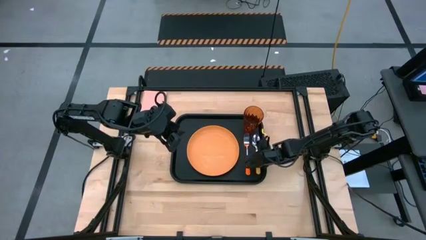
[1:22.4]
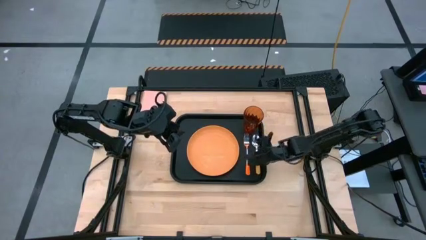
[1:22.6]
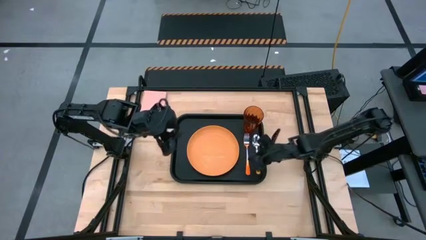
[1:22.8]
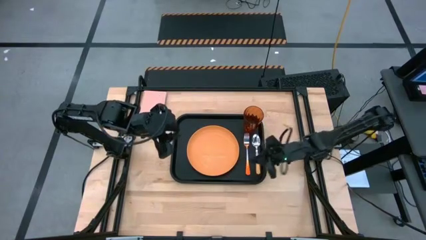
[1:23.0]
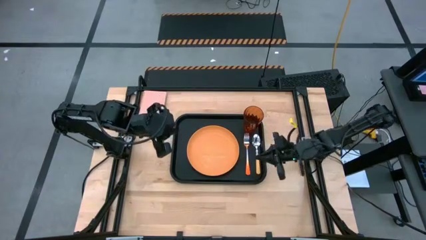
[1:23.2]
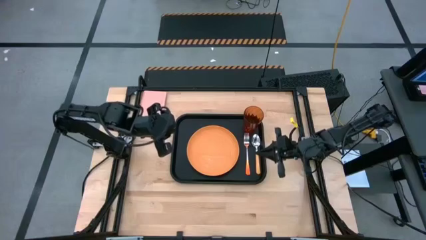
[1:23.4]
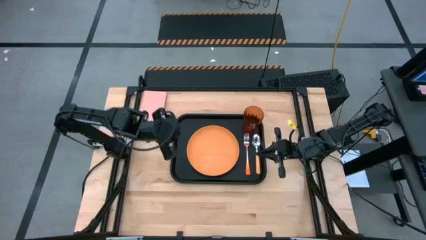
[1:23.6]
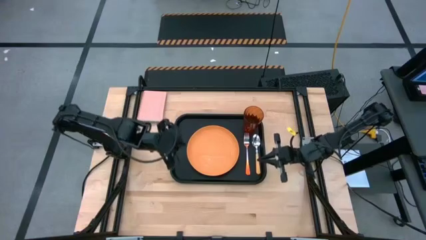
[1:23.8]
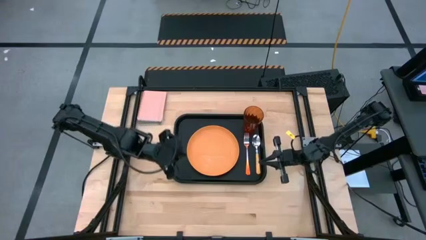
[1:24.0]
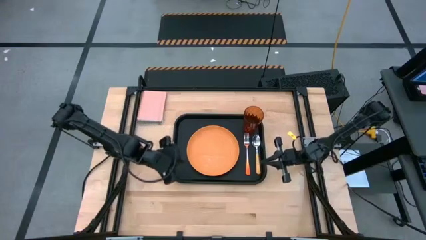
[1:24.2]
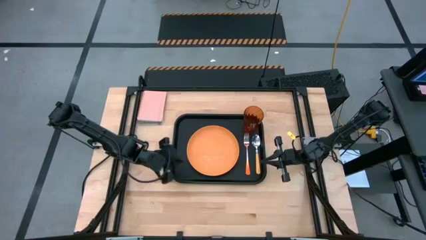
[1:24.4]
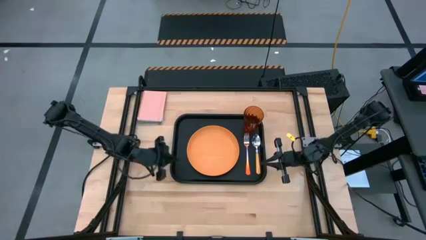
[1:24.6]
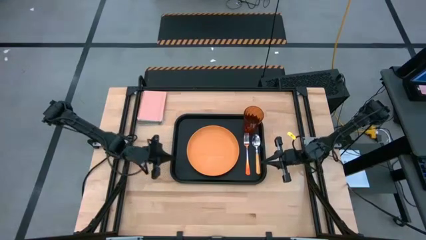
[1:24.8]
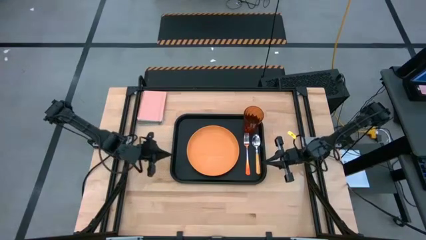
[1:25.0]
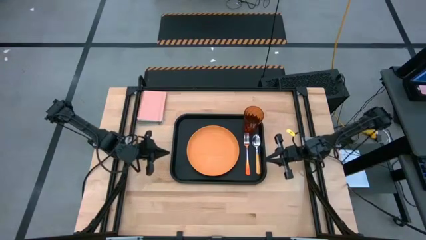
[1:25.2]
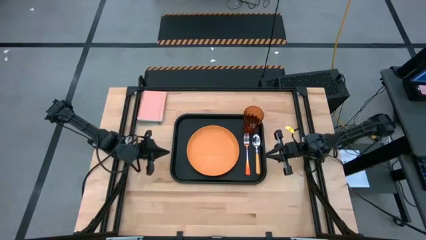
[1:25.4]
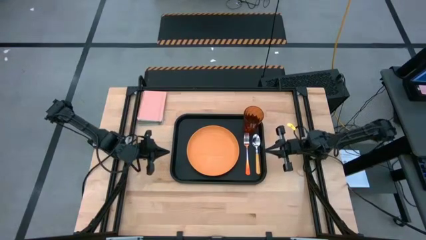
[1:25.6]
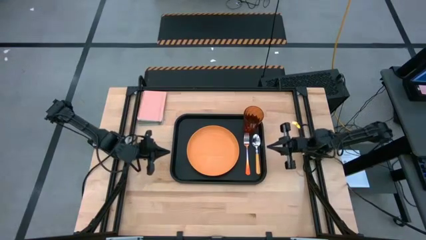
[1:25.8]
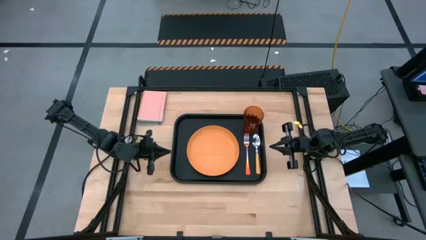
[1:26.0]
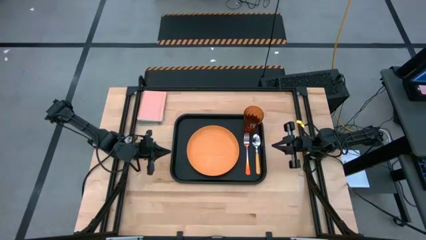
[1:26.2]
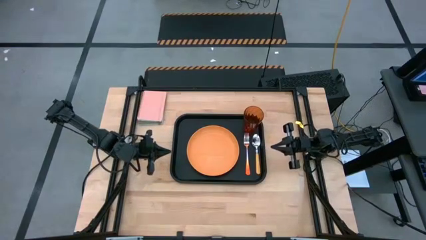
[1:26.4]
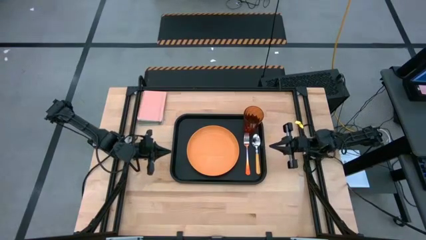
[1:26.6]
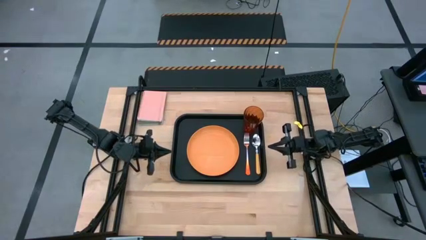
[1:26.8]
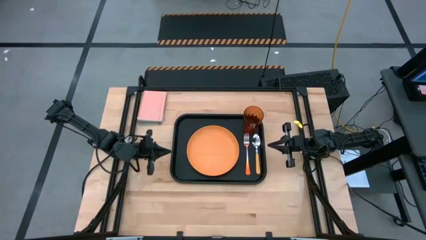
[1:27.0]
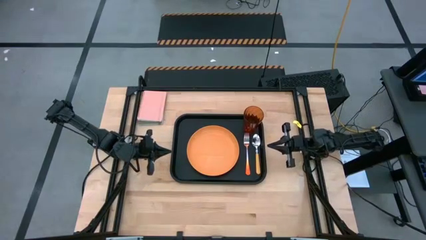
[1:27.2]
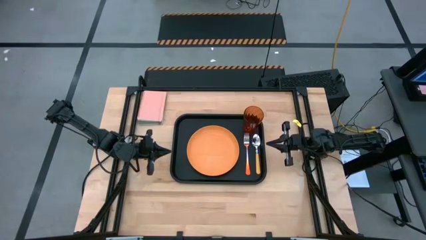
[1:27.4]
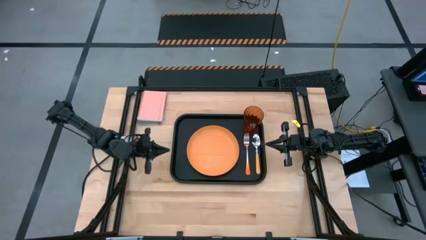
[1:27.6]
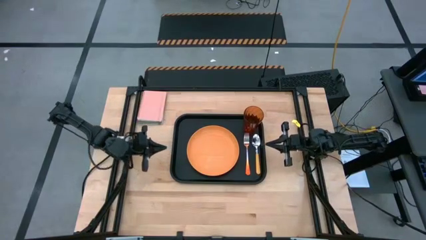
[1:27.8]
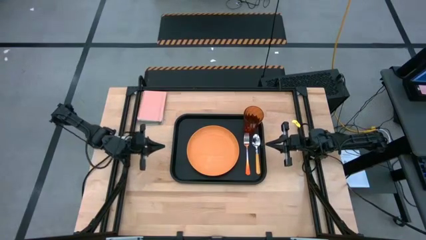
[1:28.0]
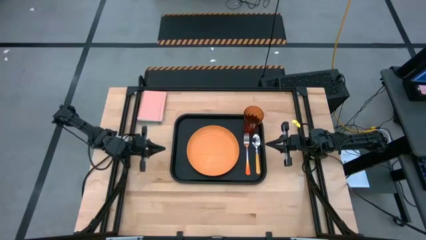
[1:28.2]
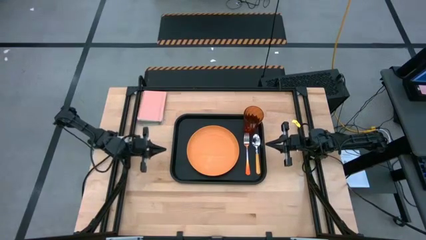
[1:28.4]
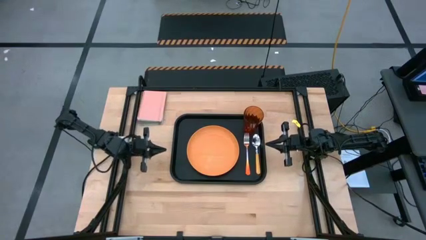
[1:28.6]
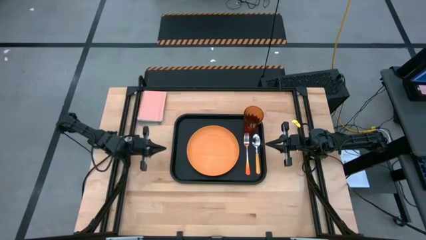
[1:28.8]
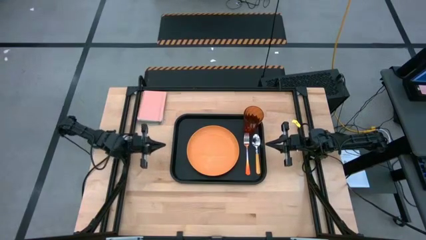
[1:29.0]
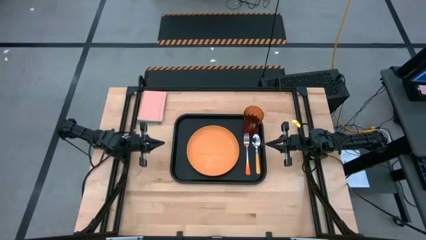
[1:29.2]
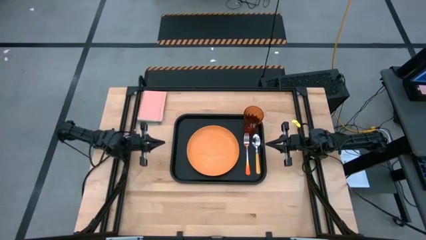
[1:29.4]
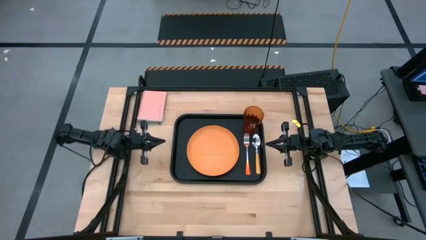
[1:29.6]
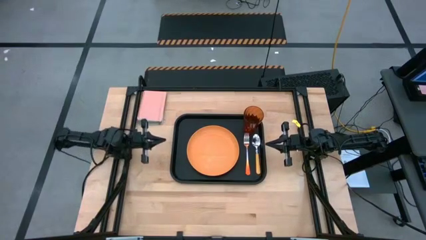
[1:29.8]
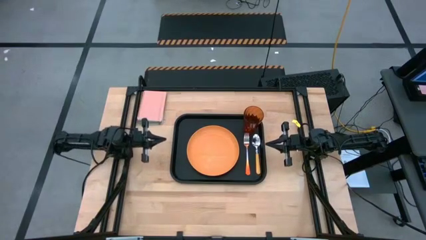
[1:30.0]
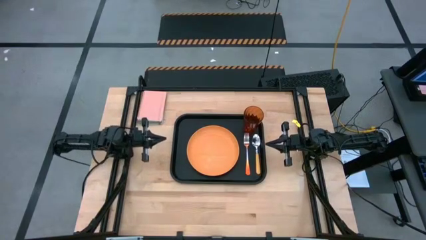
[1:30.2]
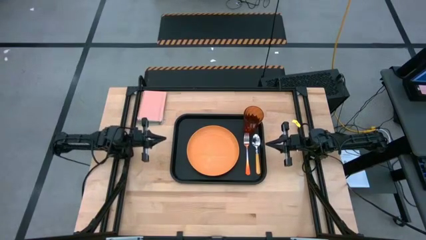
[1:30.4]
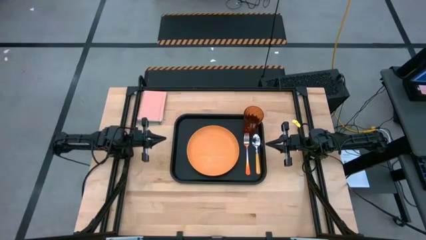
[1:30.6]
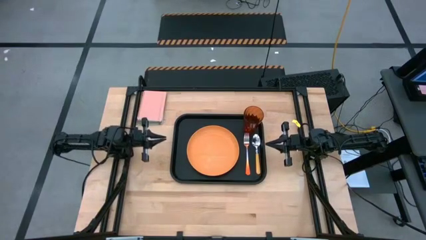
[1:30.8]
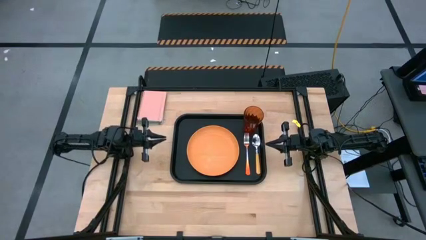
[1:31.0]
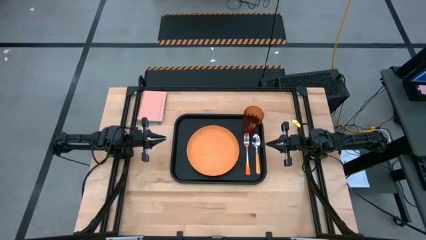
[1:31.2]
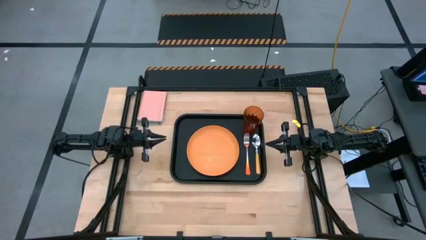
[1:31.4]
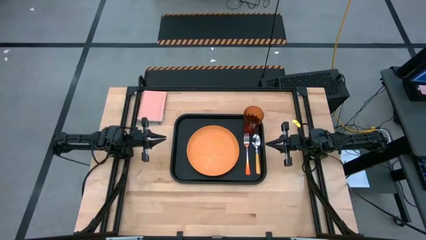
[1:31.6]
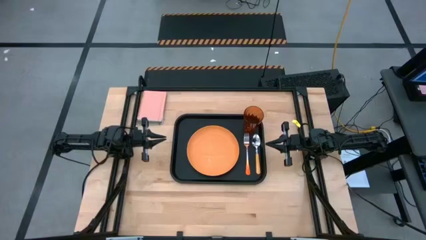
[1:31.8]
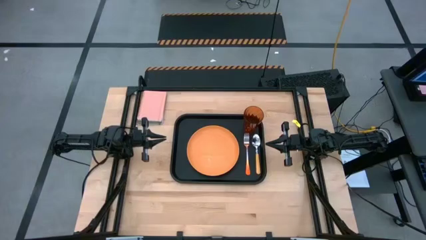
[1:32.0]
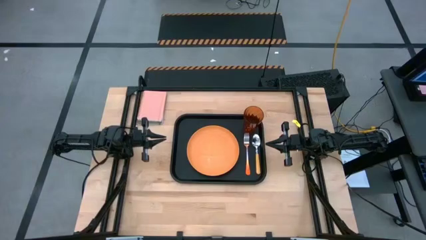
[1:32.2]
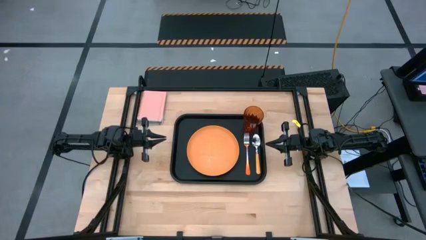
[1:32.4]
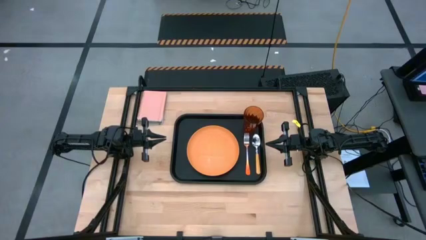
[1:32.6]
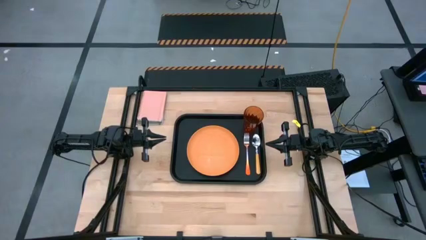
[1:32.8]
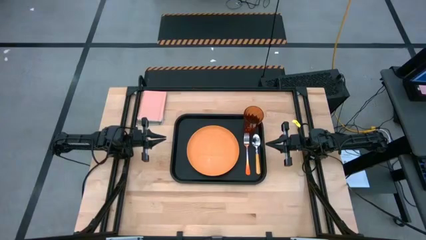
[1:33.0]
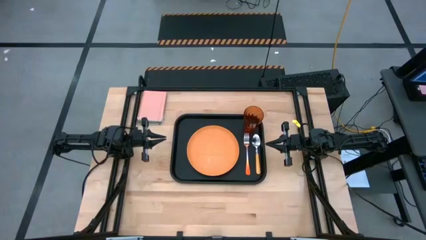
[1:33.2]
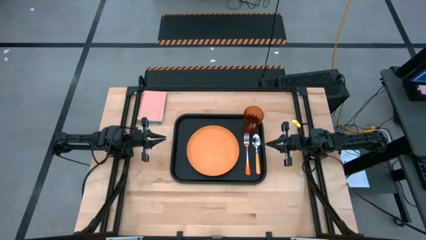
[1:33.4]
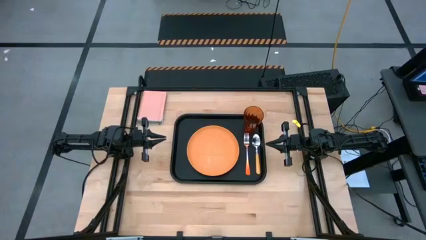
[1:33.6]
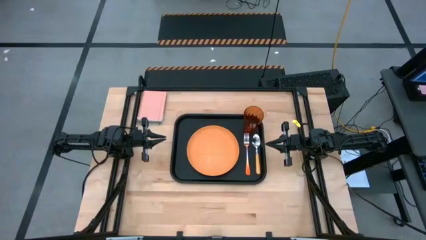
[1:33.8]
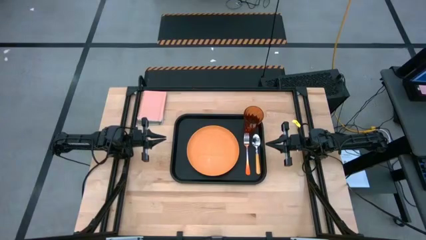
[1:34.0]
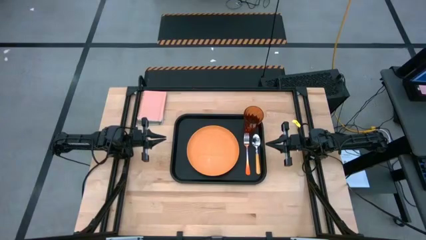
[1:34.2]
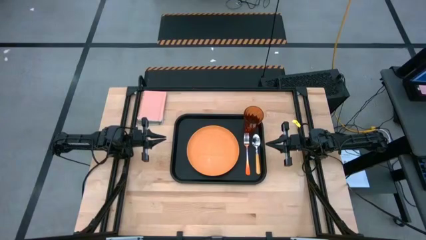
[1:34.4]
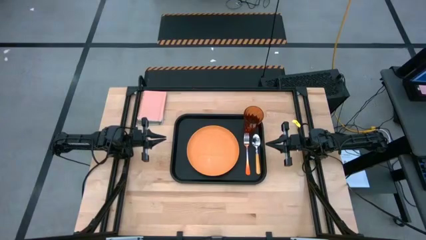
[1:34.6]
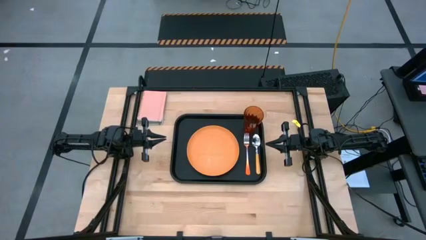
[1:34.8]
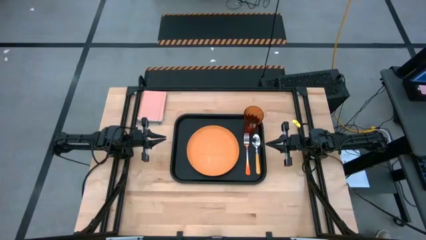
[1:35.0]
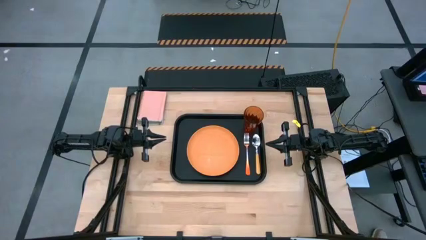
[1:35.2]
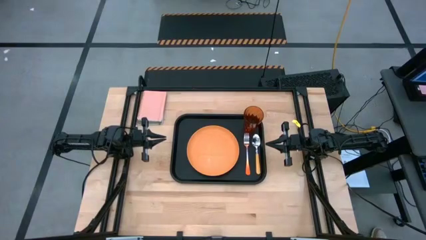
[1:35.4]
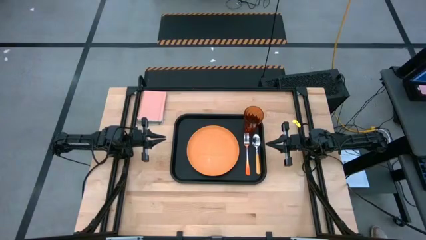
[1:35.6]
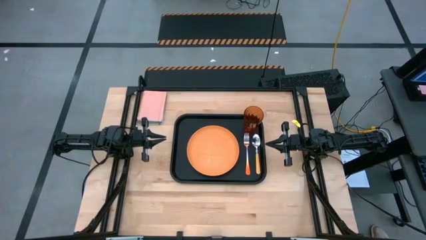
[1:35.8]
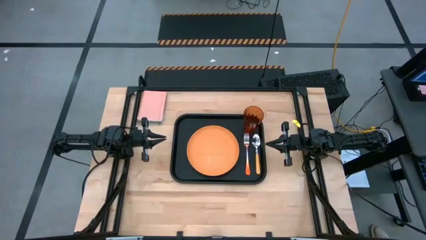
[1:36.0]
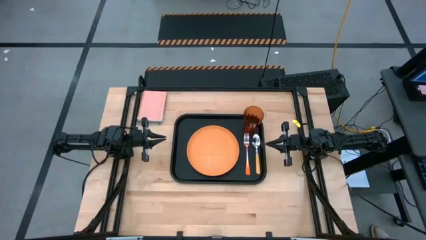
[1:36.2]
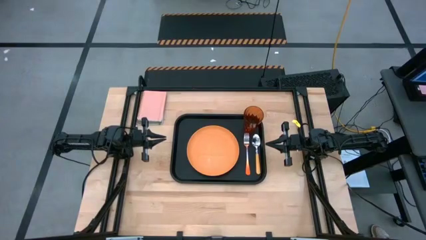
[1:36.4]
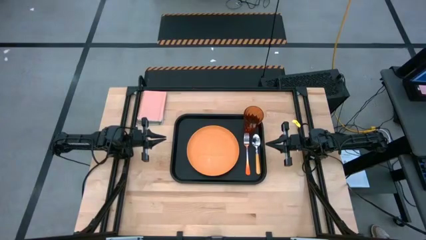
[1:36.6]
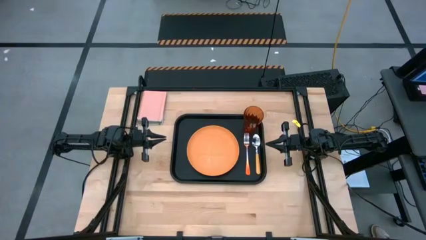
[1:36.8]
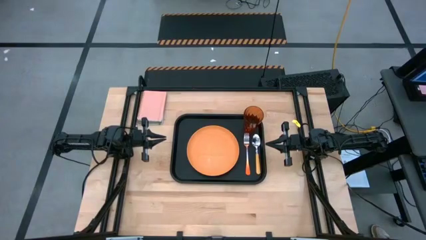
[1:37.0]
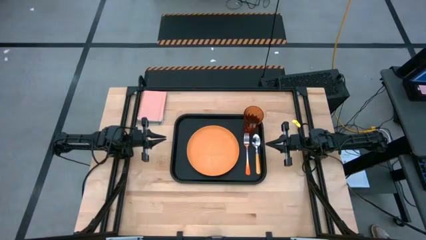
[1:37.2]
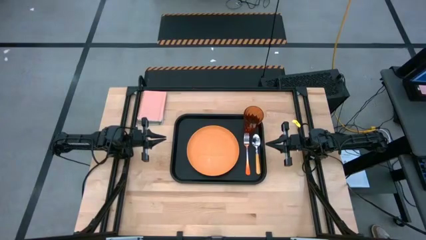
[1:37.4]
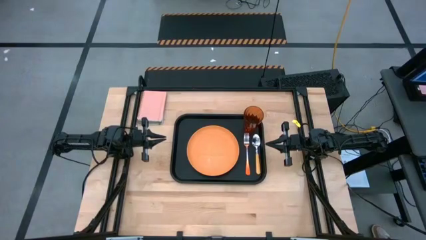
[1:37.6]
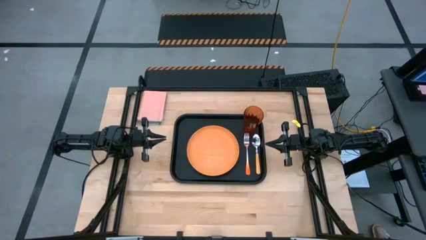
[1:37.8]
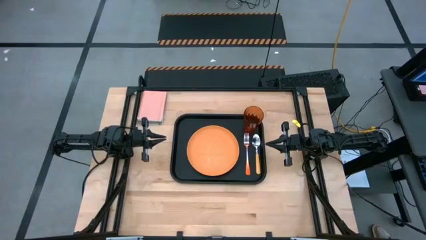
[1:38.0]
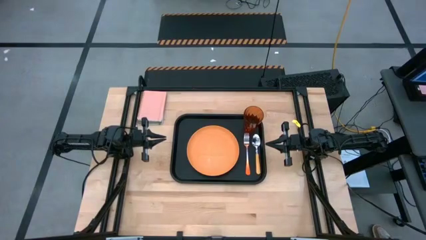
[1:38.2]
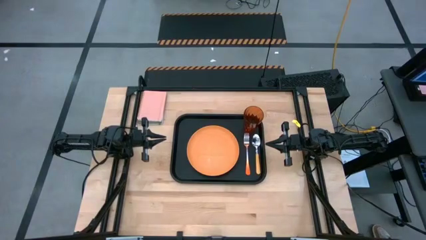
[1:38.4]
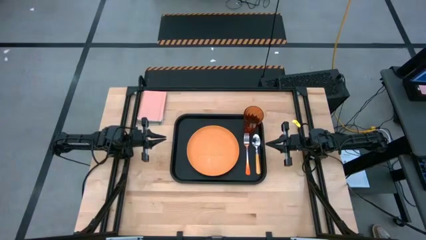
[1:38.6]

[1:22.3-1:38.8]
Task: Pick and place plate/cup/fork/spoon on tray
Return to Home Position

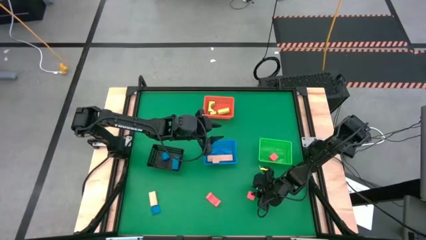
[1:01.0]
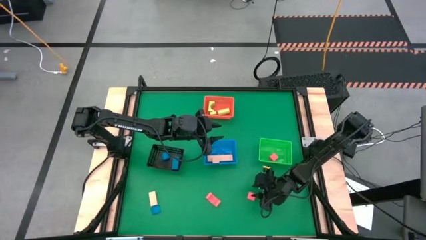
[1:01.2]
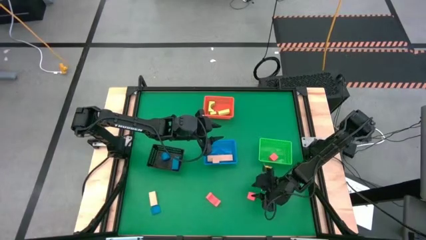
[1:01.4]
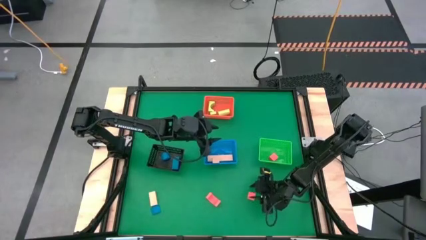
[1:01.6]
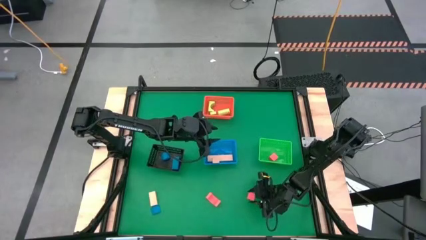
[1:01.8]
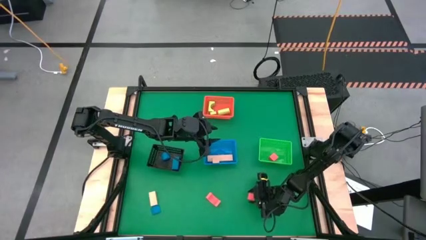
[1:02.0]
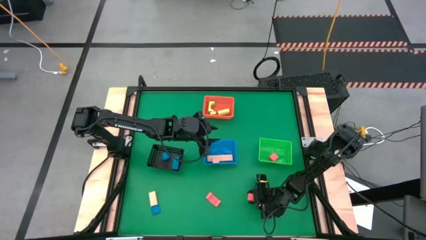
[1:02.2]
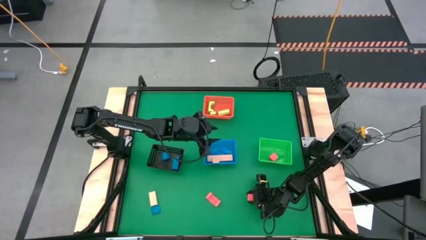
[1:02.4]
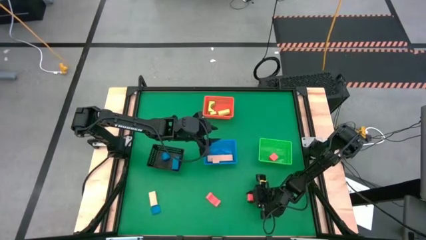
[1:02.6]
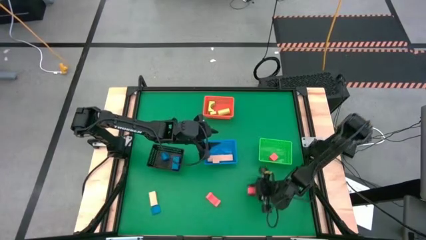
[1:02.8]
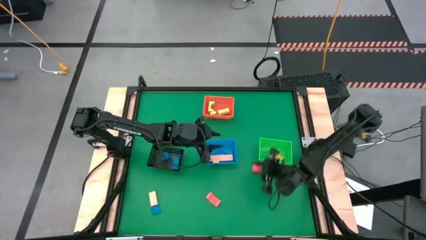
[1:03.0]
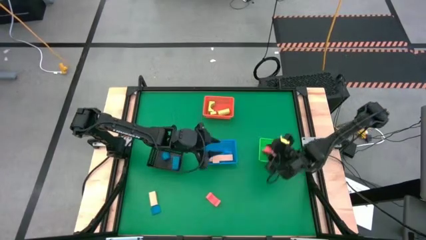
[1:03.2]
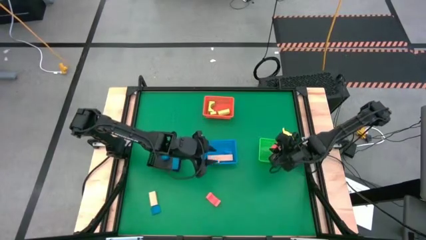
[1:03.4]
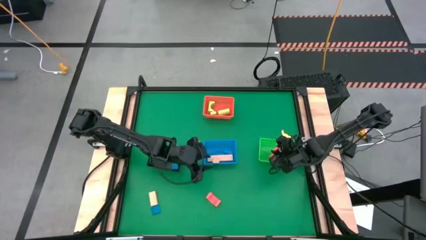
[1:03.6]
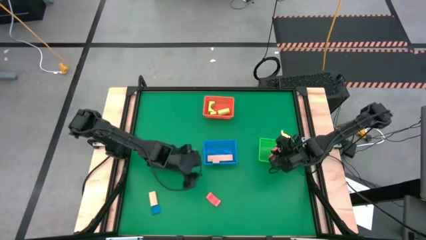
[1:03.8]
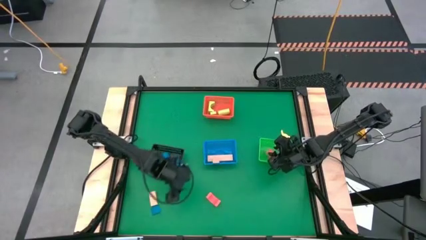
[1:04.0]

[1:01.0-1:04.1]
Task: Sort & place blocks by color
Put the right red block into the green bin
